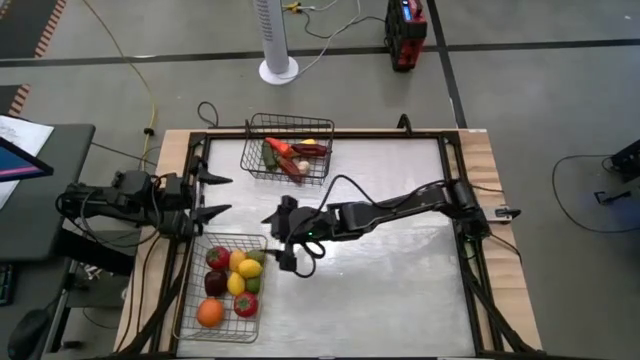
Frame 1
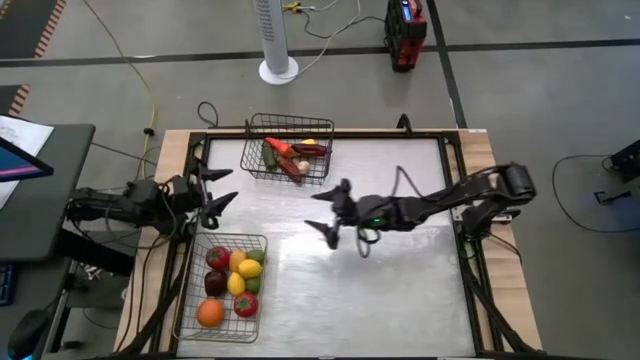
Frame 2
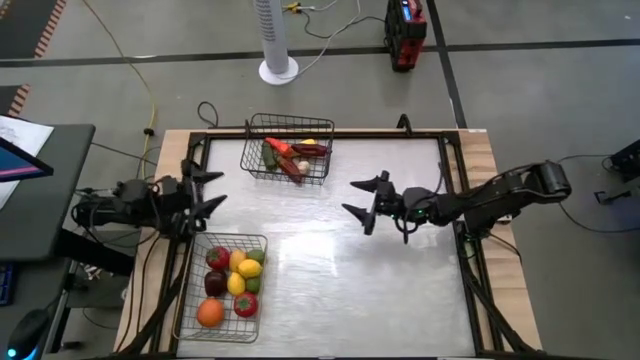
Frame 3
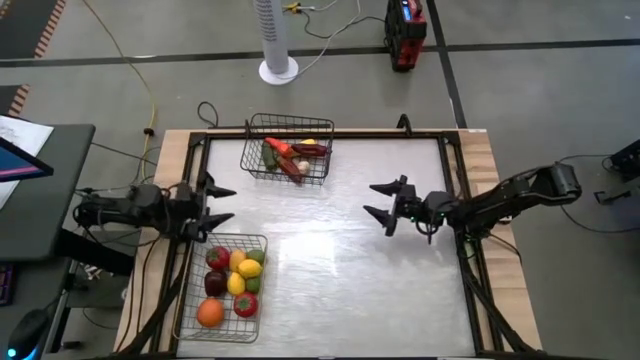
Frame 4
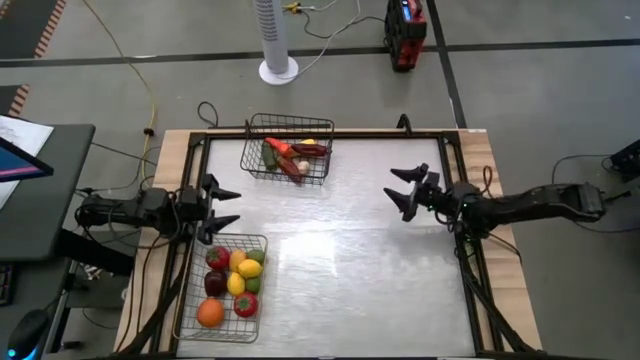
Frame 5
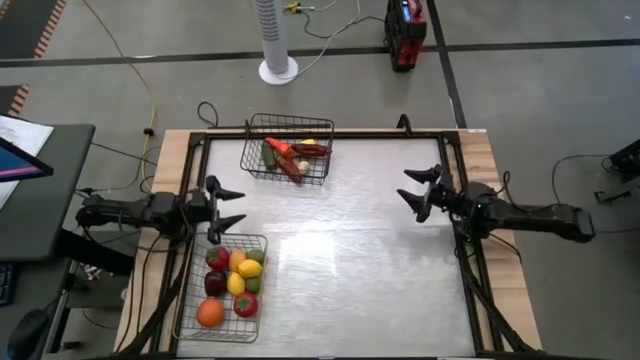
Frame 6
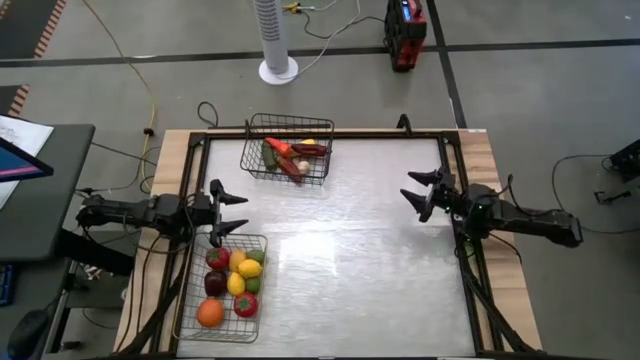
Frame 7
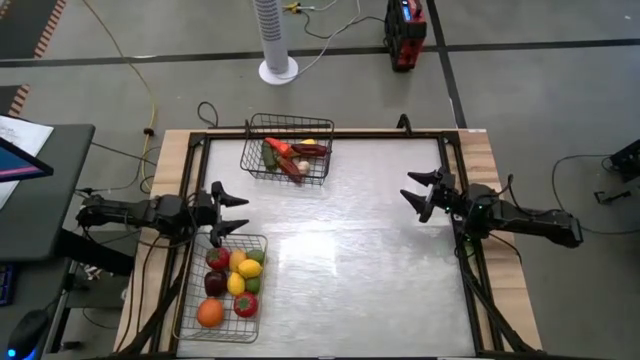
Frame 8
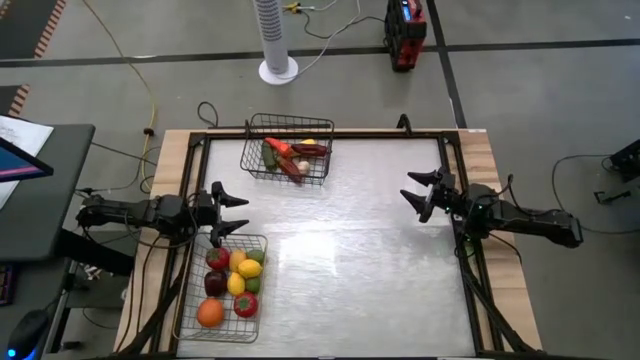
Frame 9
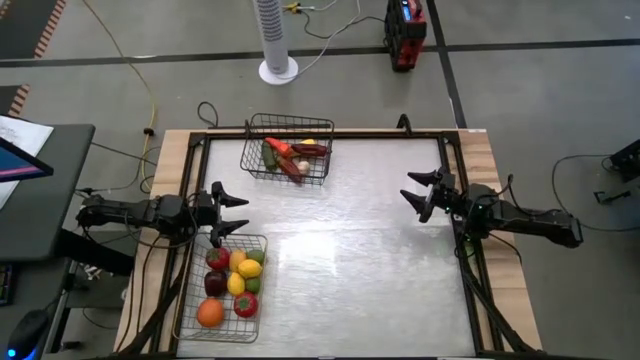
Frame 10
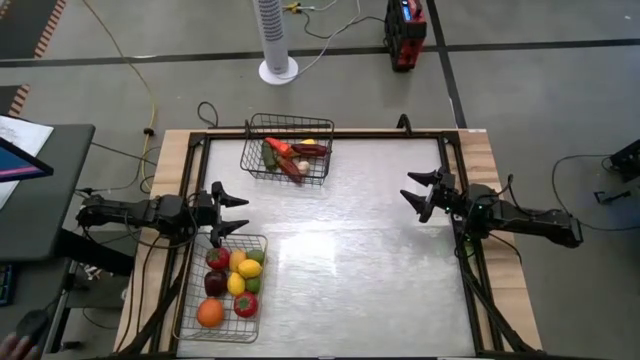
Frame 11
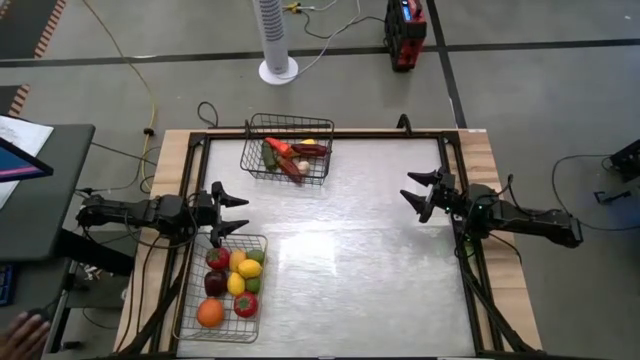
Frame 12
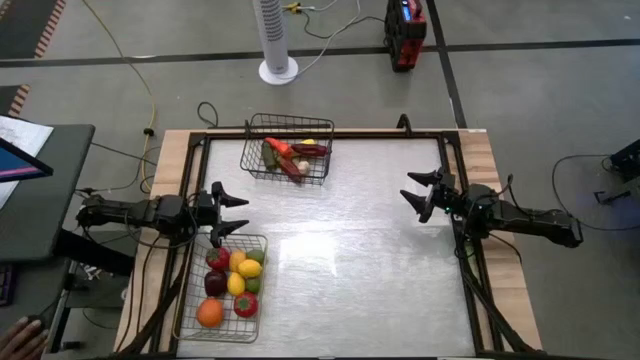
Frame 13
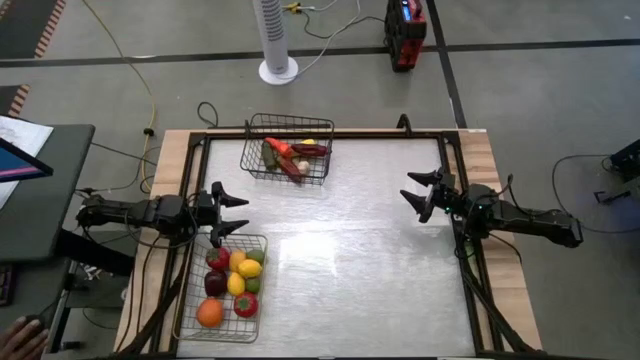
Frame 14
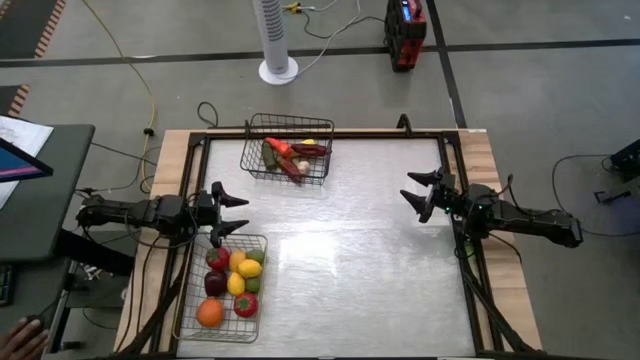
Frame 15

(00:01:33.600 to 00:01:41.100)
Task: Sort produce into baskets
Return to Home Position

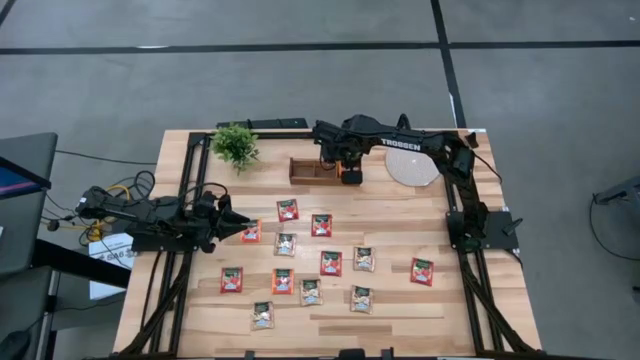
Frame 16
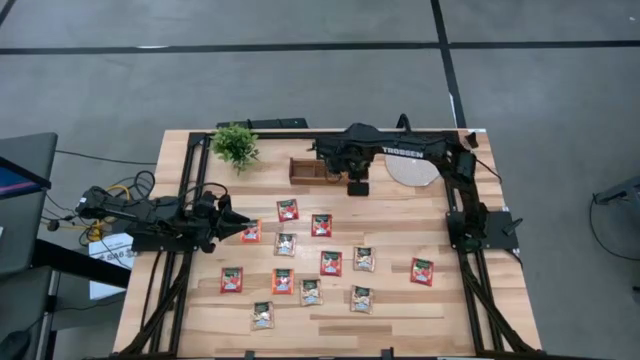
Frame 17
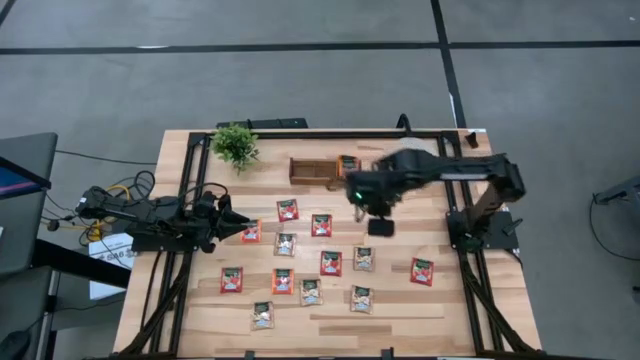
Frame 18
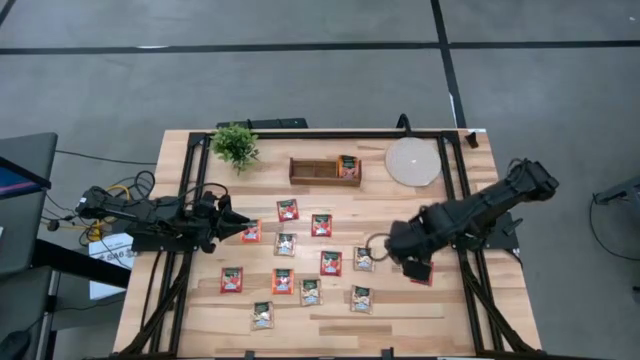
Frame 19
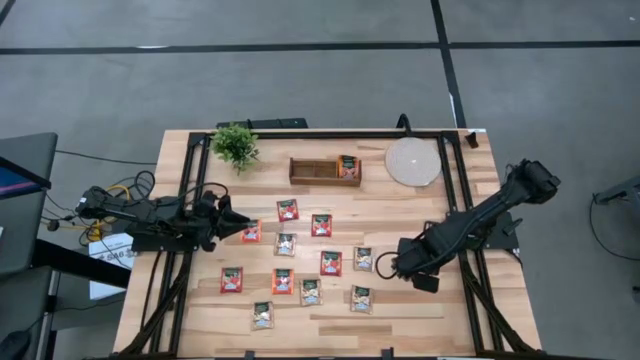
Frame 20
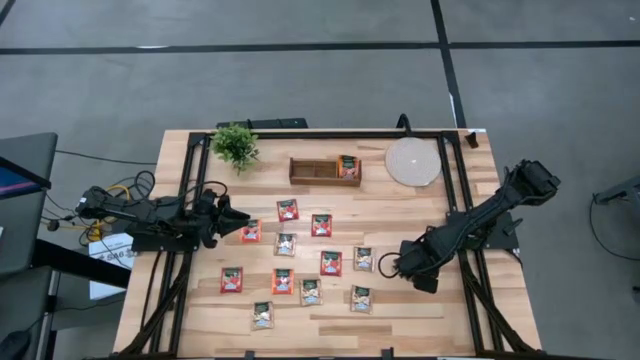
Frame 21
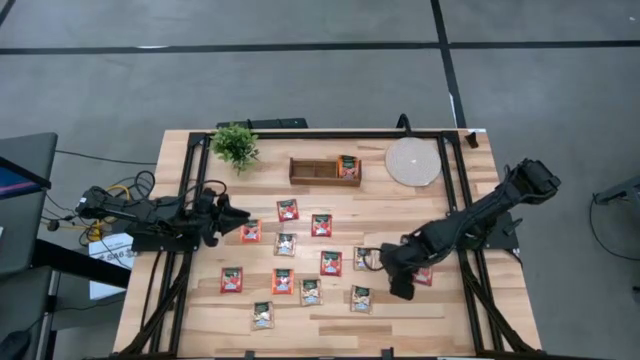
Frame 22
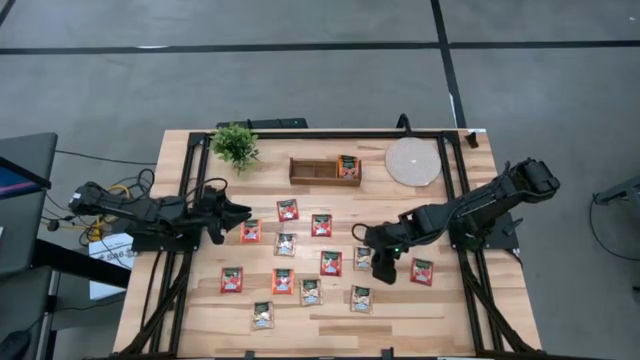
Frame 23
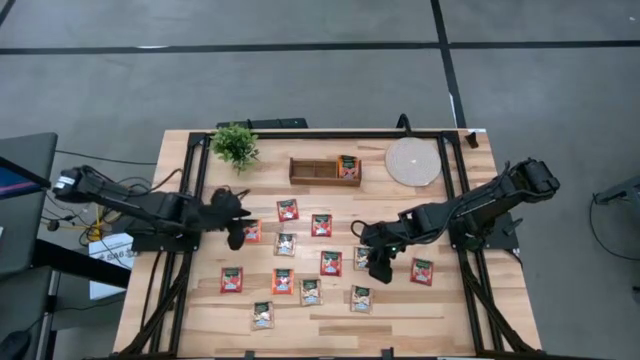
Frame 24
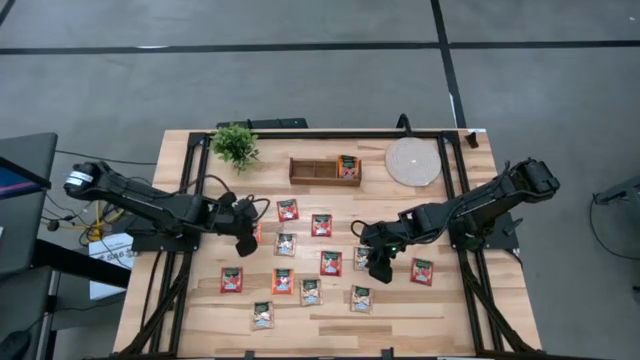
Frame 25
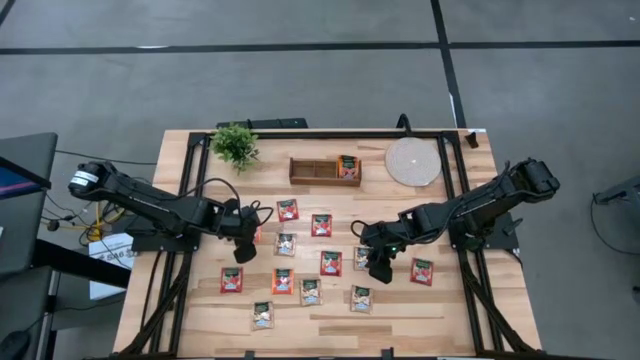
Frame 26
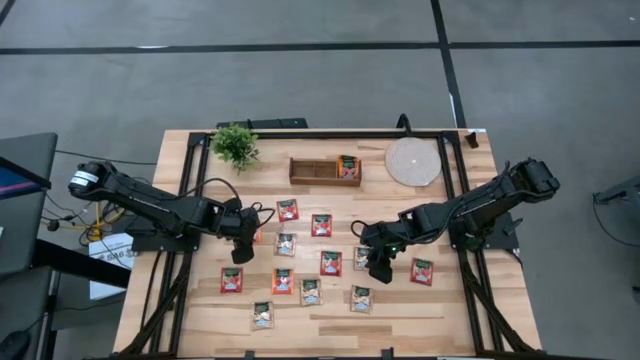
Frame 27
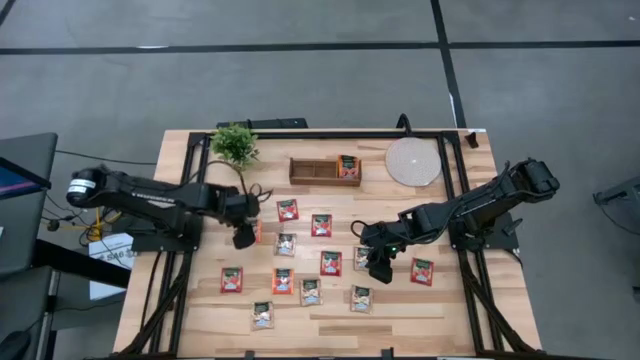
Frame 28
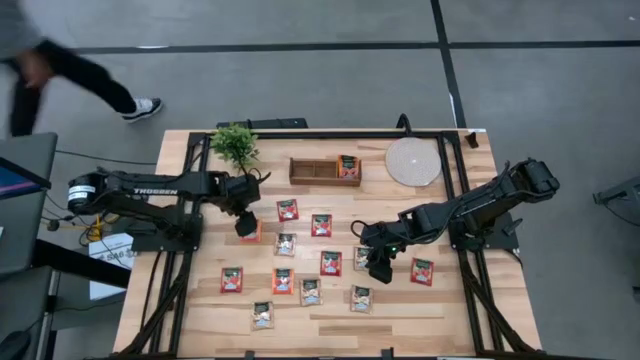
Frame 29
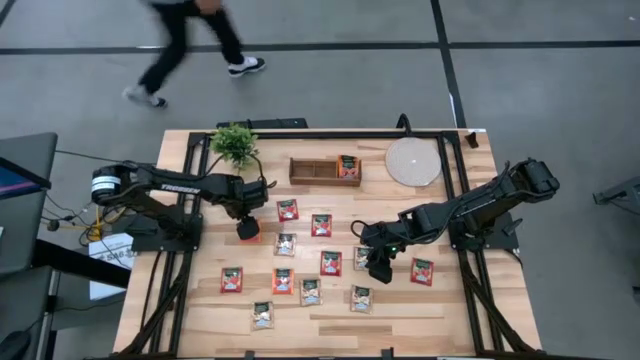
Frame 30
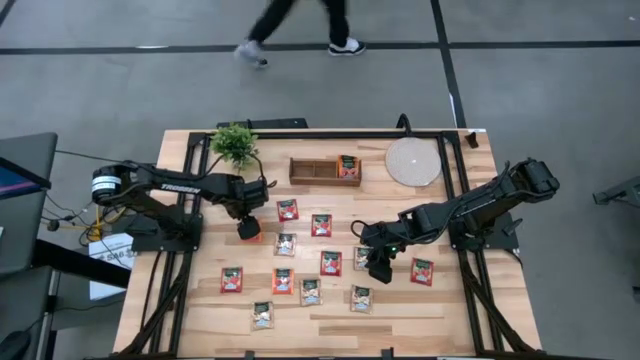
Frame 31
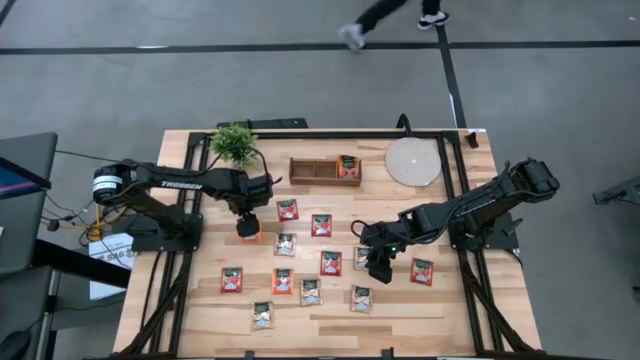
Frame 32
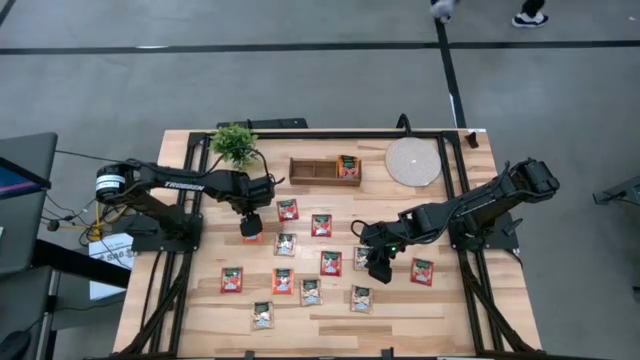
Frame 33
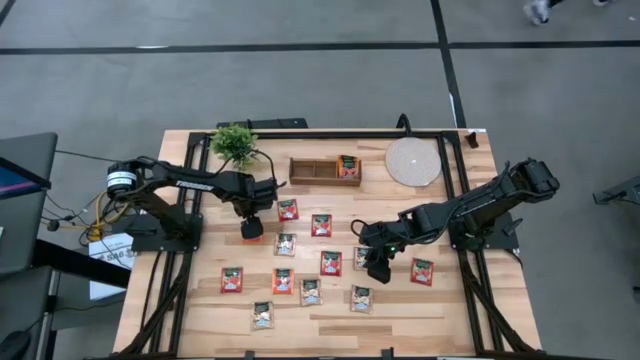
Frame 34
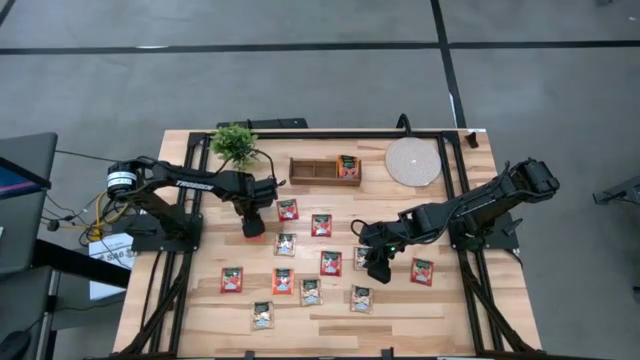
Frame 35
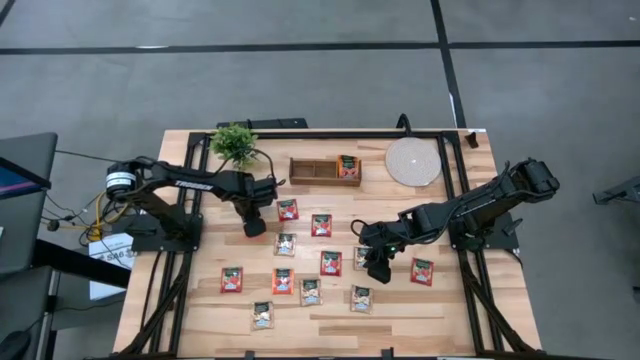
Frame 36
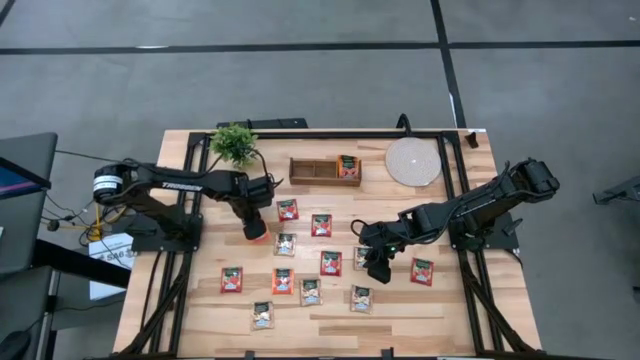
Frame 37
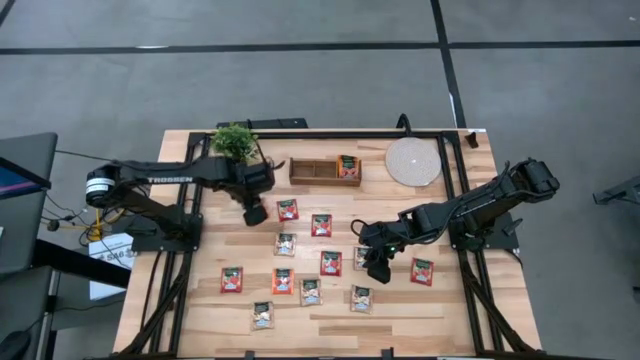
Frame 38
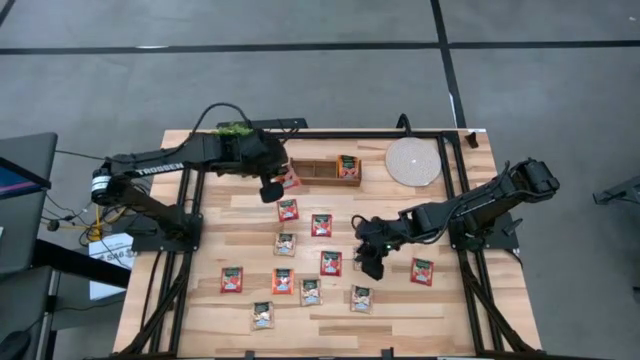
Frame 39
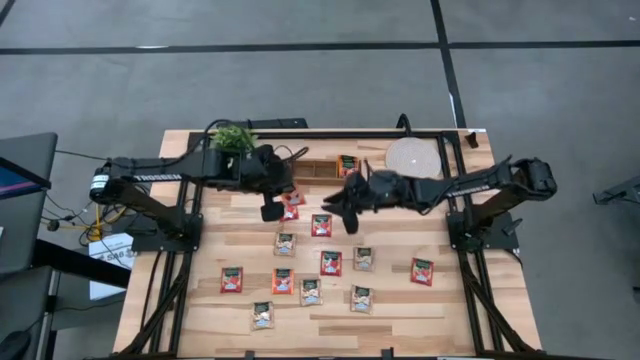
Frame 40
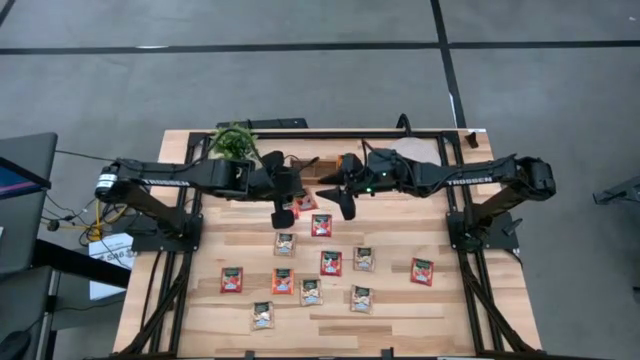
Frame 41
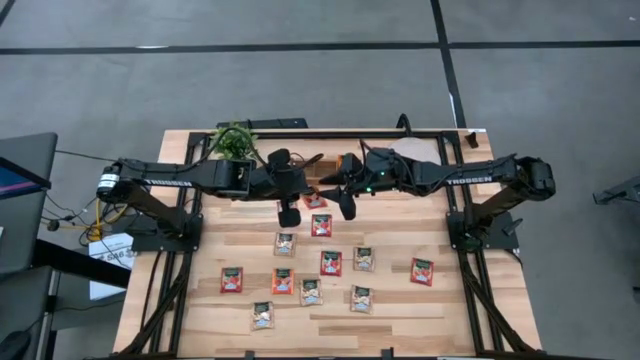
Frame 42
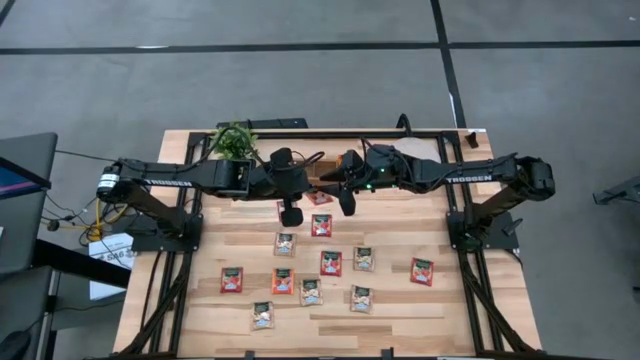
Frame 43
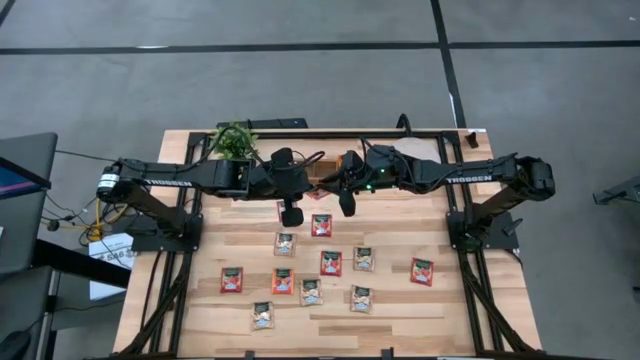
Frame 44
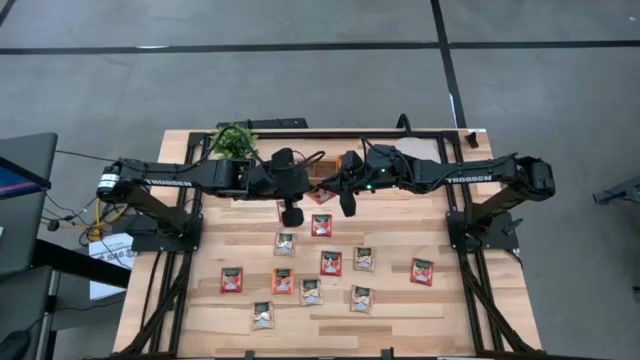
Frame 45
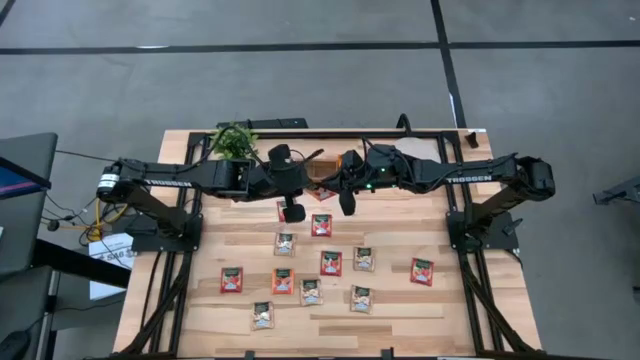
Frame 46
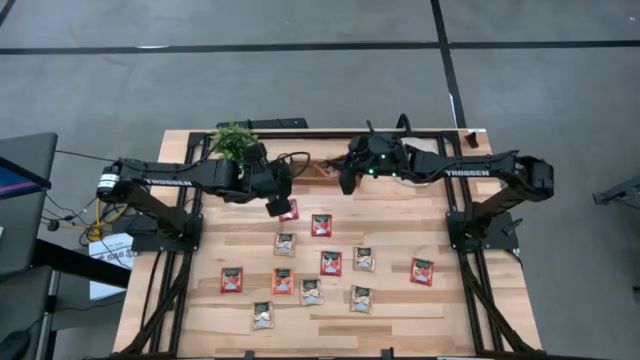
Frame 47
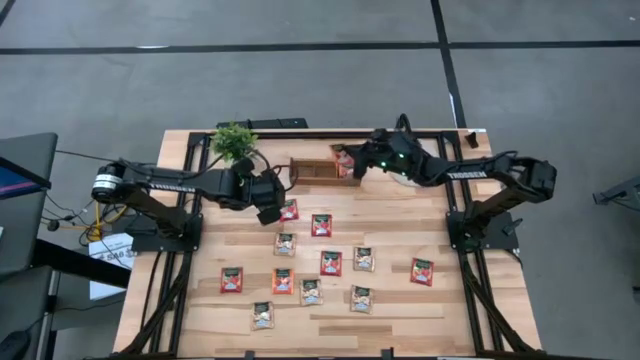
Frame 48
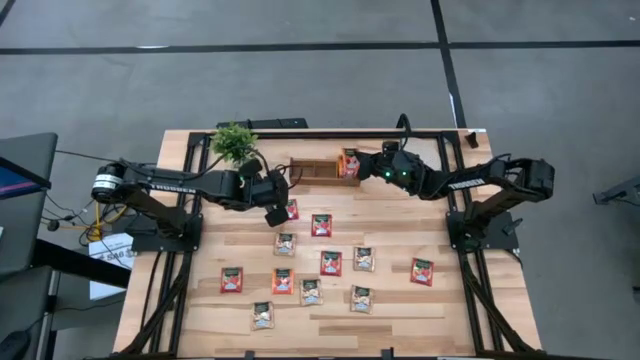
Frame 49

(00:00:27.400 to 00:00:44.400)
Task: Pick & Place Tea
Put the orange tea bag into the right section of the wooden organizer
